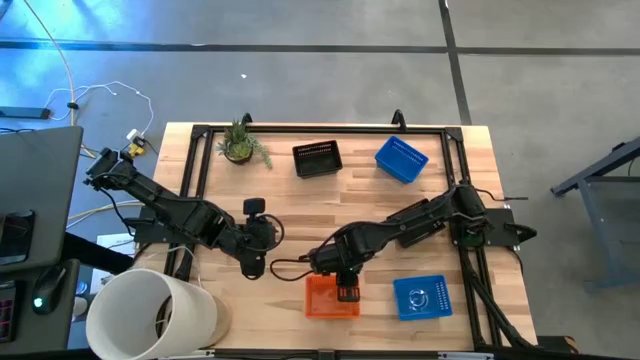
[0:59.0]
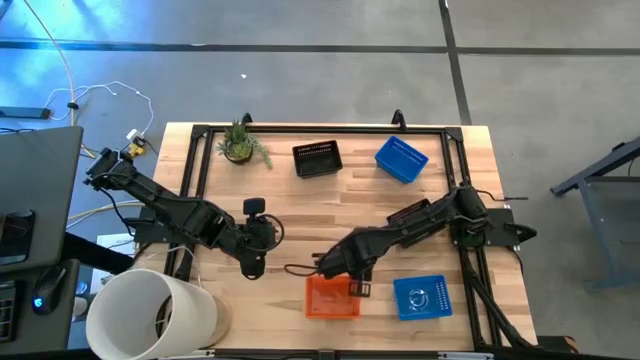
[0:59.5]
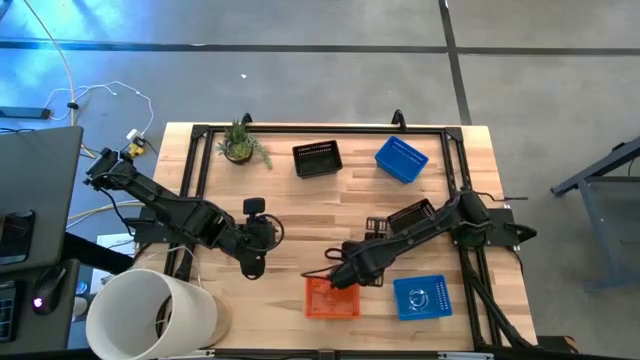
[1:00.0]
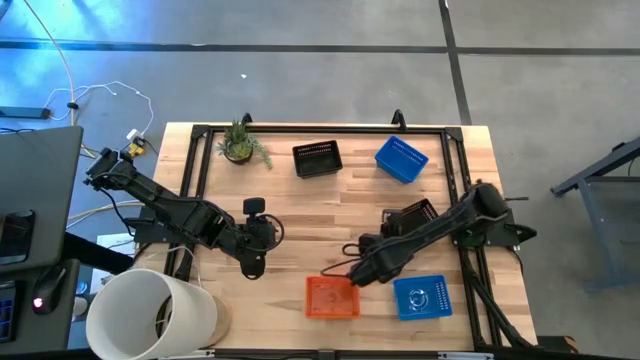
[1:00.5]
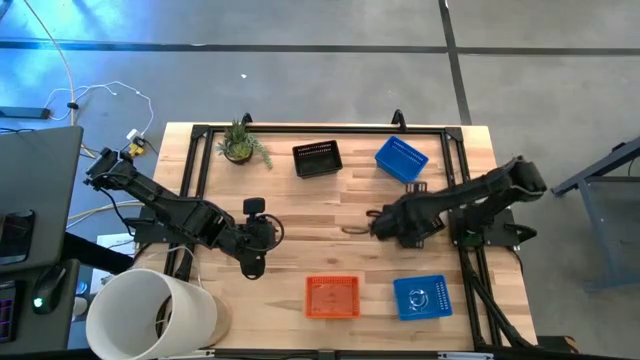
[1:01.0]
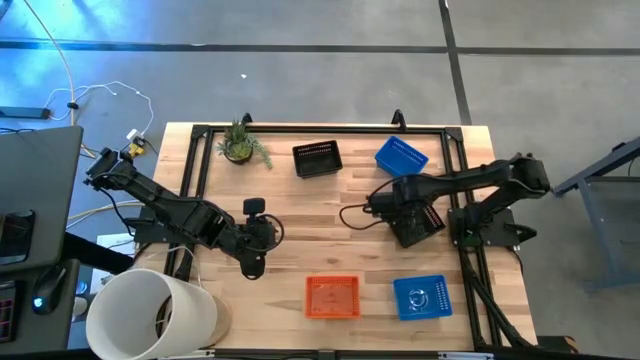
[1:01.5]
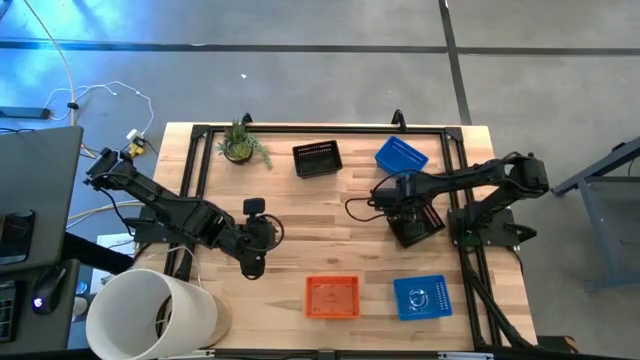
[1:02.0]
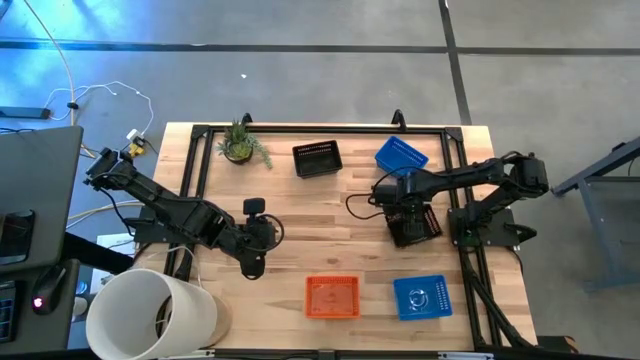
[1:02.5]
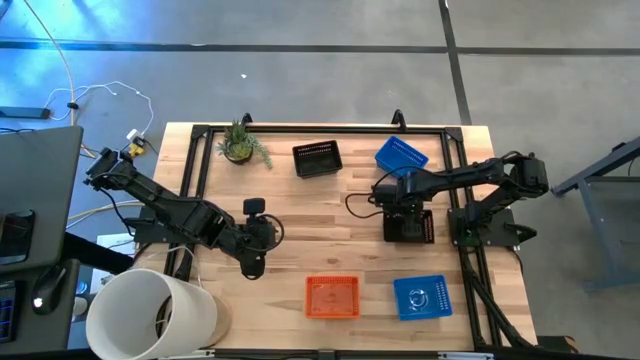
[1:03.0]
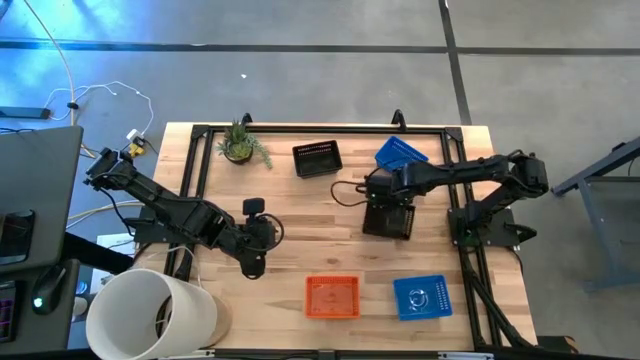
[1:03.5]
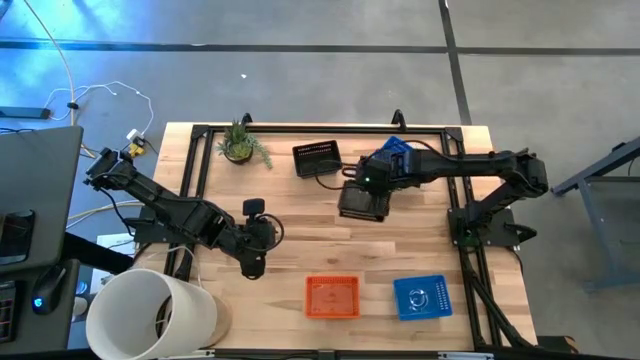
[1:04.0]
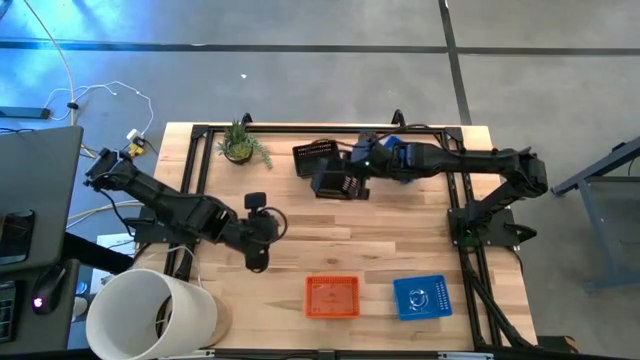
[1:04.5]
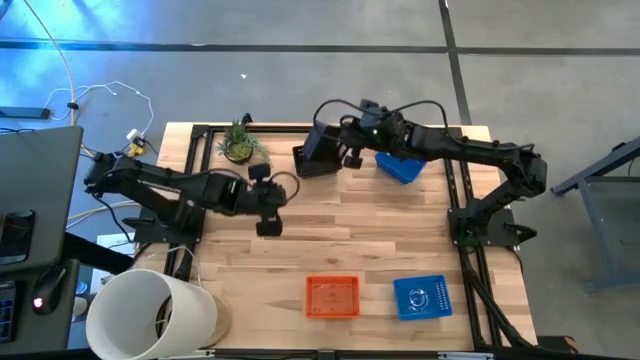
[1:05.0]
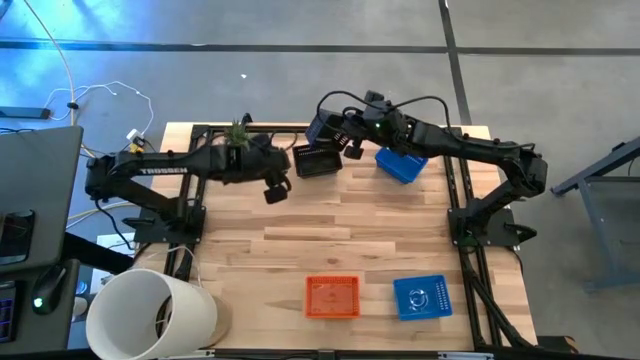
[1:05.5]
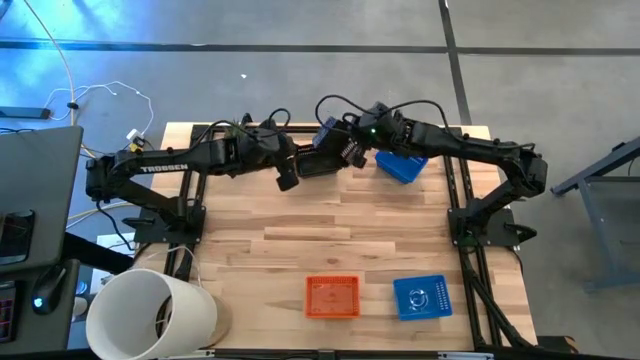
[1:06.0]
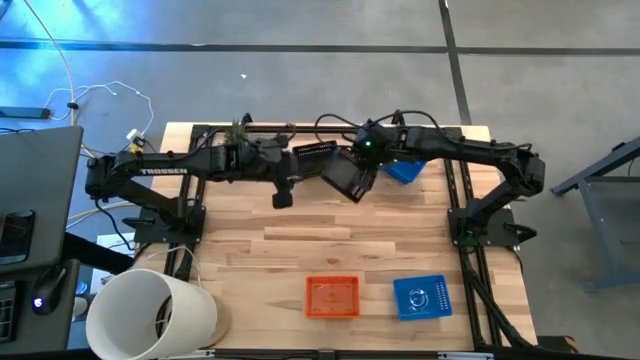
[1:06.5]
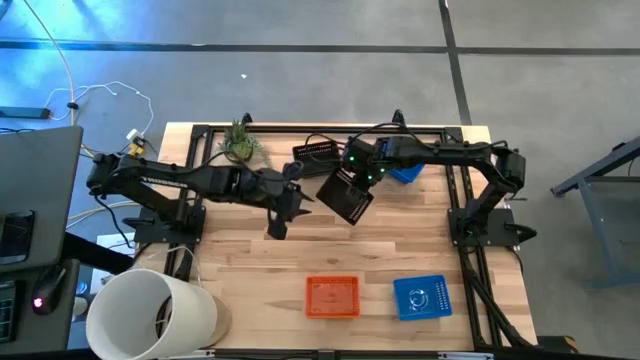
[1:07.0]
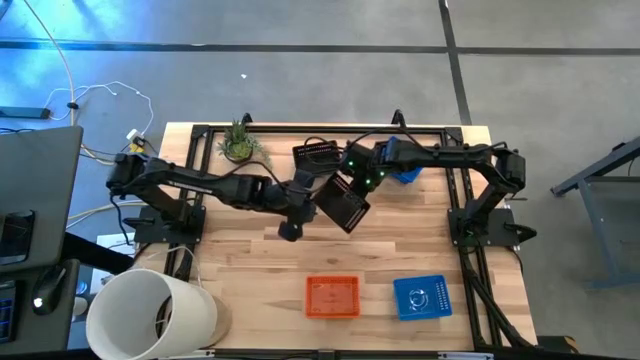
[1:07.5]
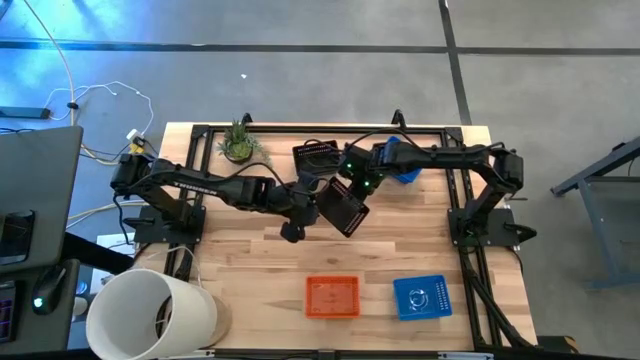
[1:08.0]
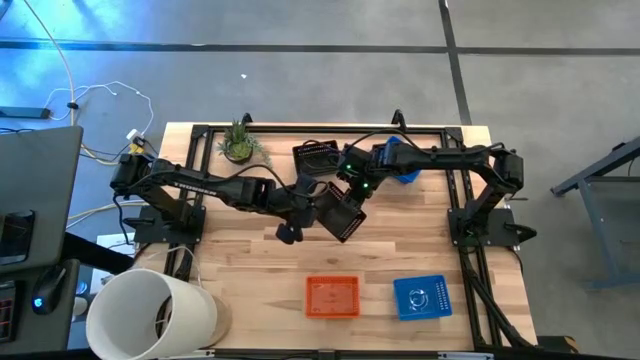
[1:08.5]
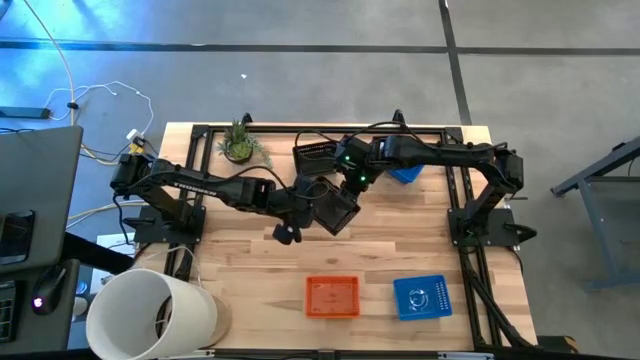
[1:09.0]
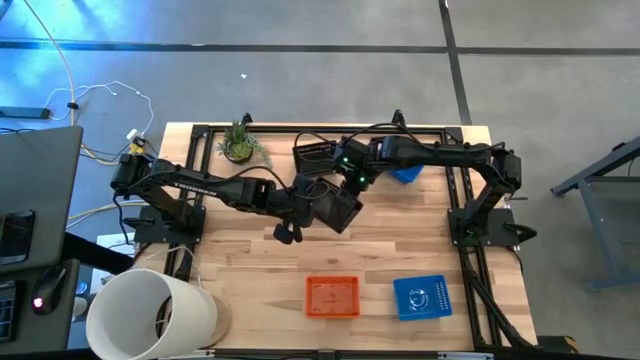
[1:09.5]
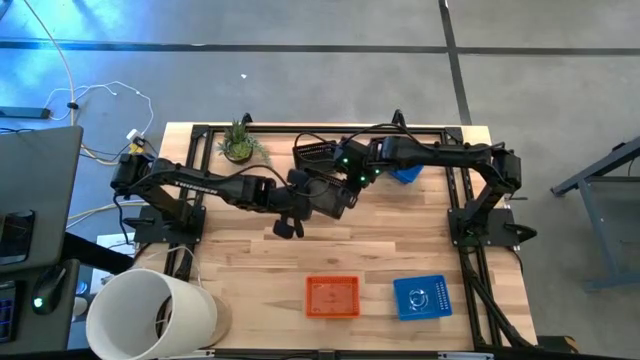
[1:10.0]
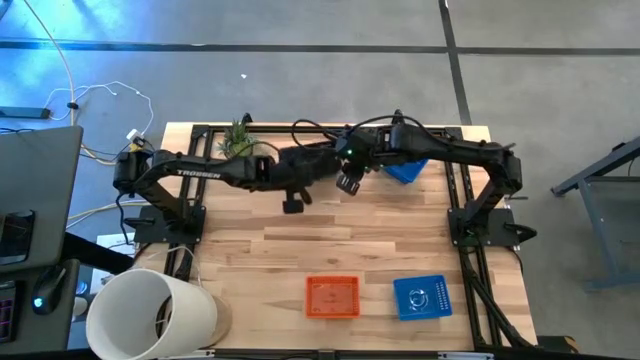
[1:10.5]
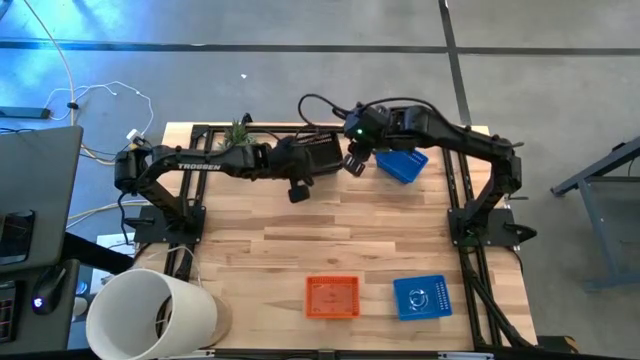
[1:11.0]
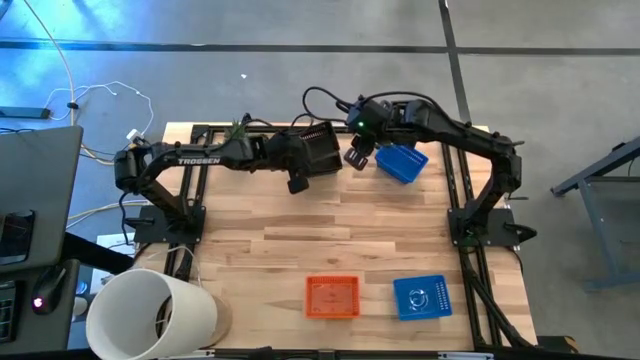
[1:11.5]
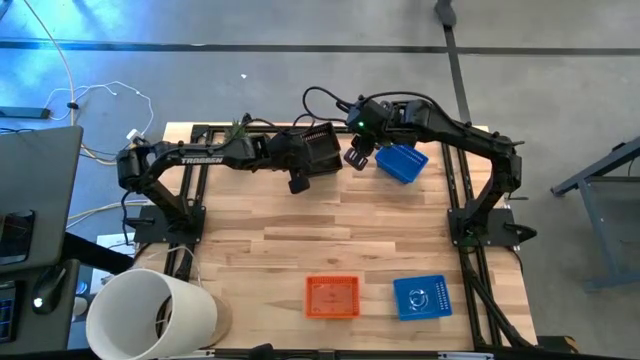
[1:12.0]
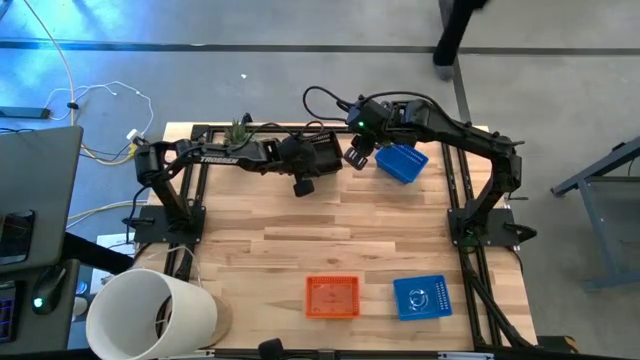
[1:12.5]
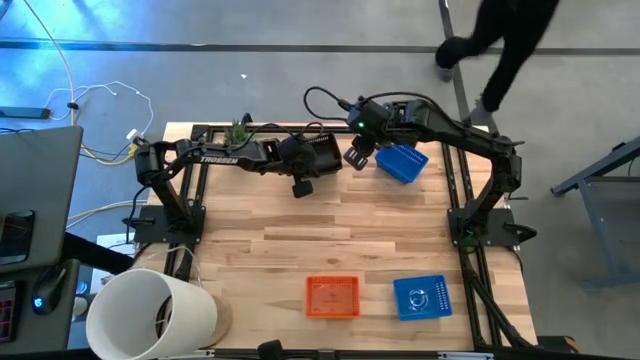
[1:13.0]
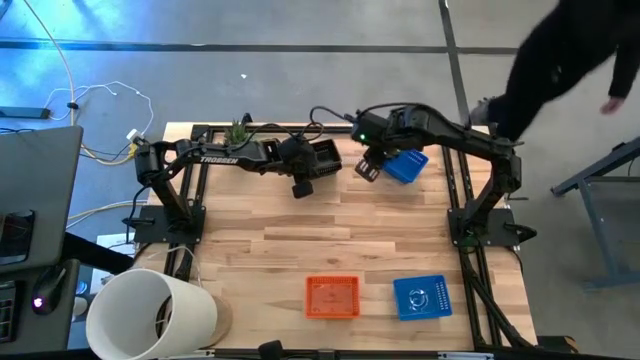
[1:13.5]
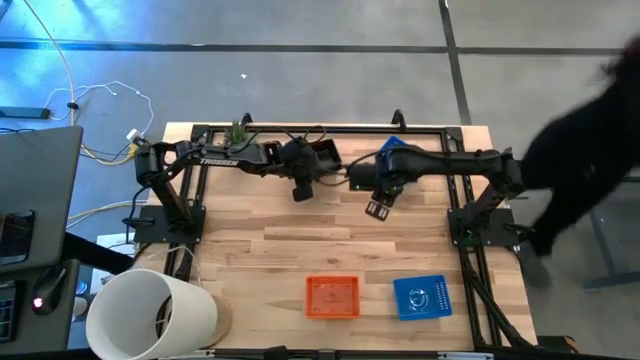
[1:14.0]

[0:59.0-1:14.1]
Stack the bottom black basket on top of the top black basket
